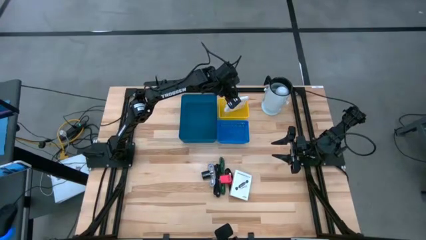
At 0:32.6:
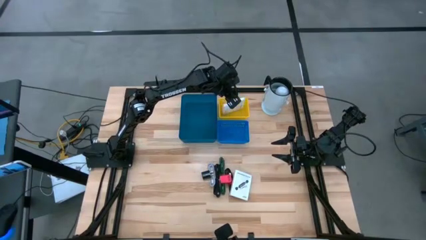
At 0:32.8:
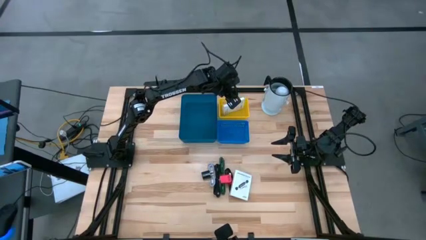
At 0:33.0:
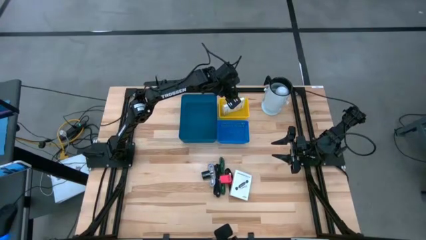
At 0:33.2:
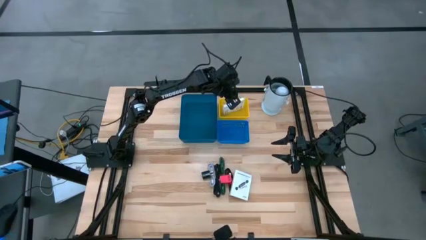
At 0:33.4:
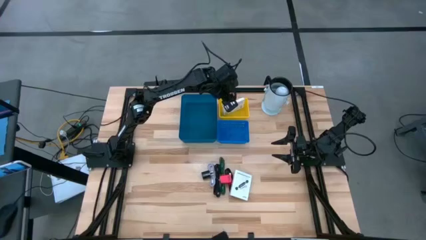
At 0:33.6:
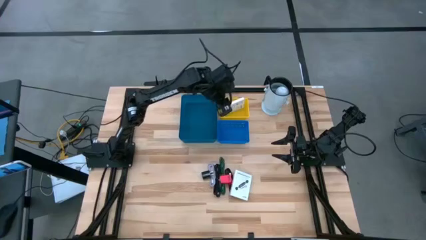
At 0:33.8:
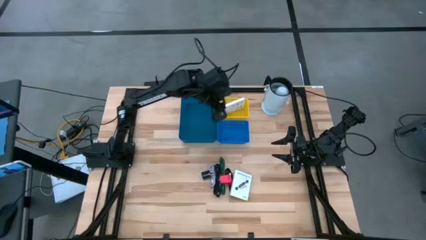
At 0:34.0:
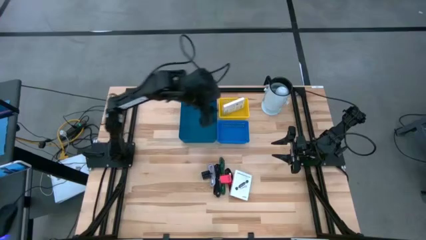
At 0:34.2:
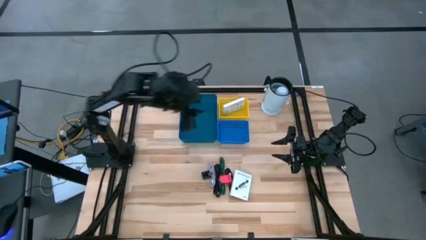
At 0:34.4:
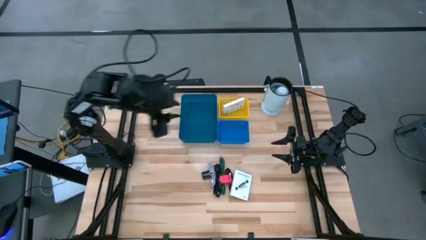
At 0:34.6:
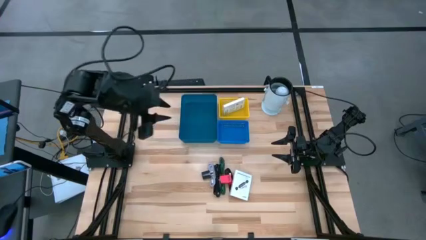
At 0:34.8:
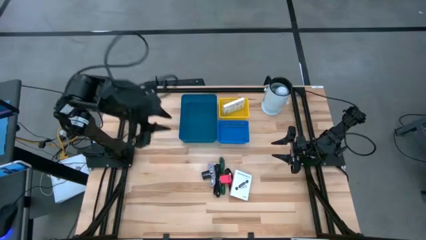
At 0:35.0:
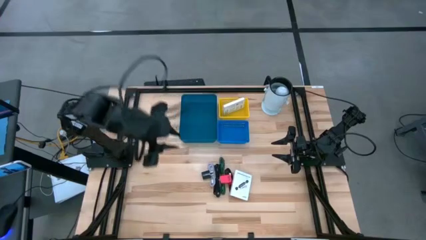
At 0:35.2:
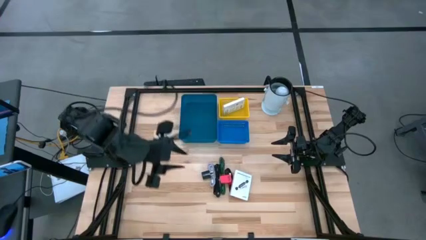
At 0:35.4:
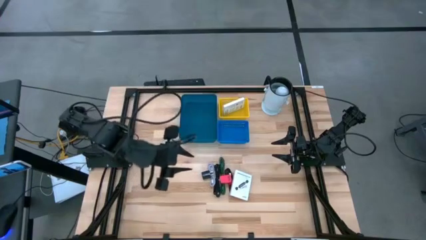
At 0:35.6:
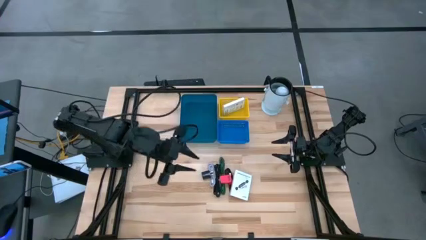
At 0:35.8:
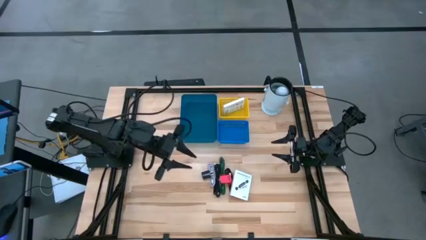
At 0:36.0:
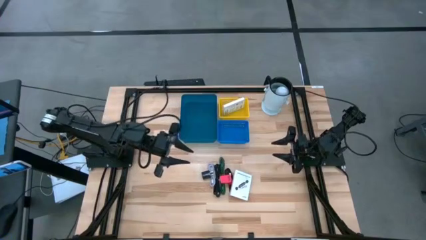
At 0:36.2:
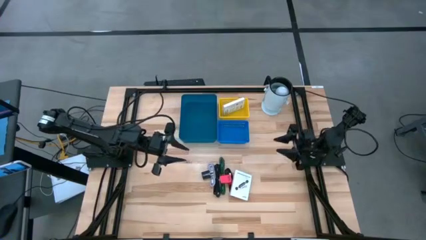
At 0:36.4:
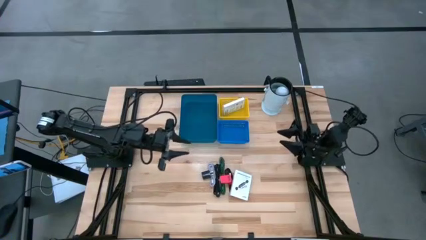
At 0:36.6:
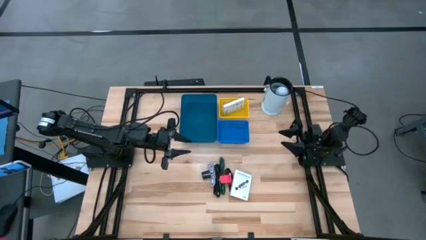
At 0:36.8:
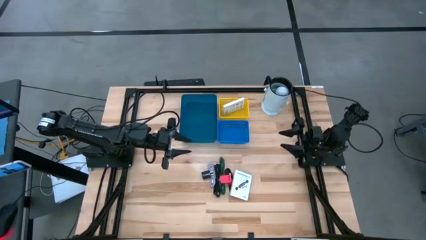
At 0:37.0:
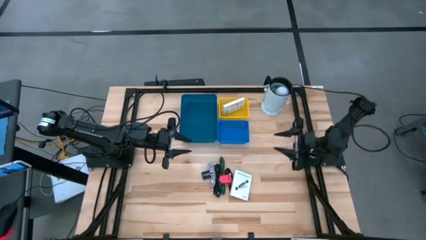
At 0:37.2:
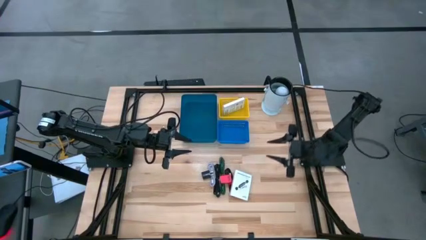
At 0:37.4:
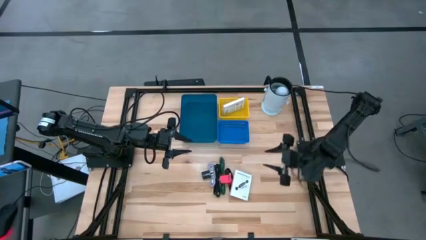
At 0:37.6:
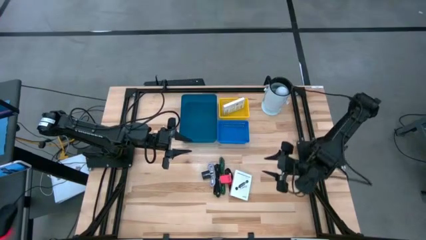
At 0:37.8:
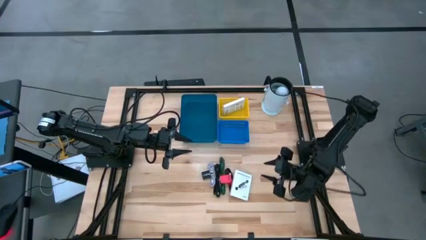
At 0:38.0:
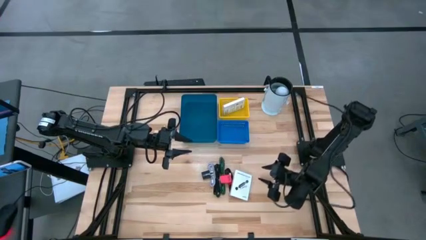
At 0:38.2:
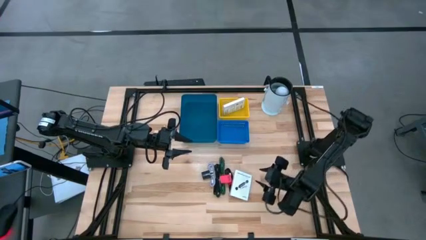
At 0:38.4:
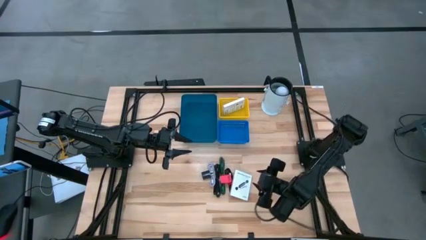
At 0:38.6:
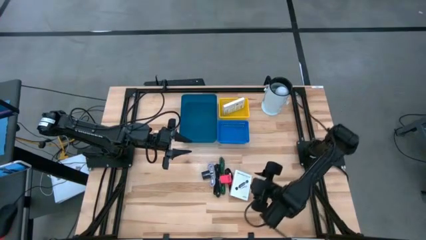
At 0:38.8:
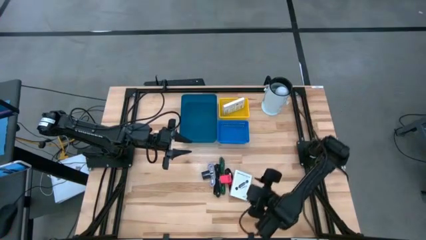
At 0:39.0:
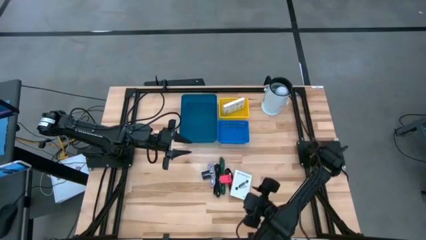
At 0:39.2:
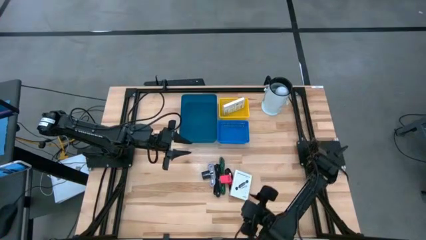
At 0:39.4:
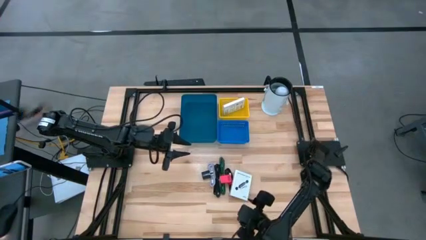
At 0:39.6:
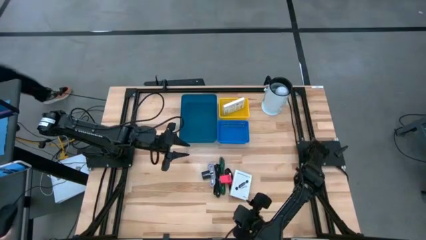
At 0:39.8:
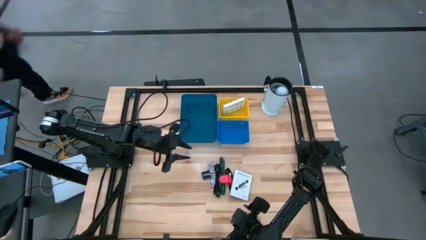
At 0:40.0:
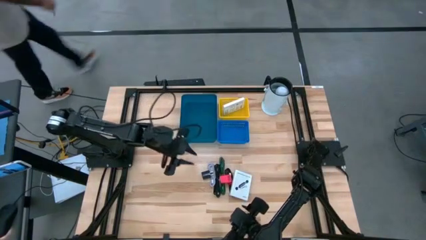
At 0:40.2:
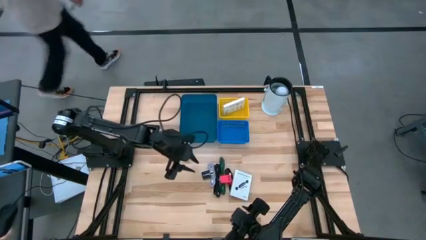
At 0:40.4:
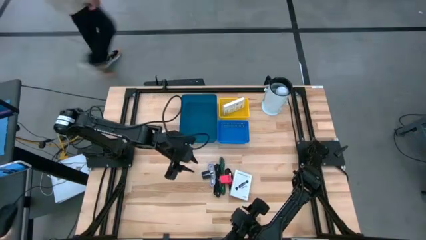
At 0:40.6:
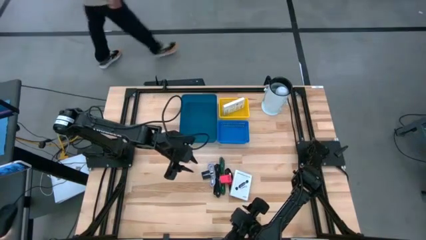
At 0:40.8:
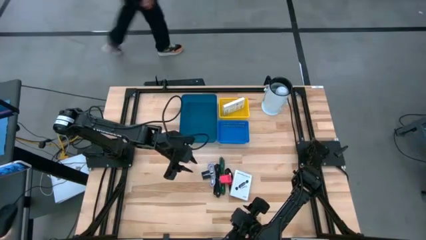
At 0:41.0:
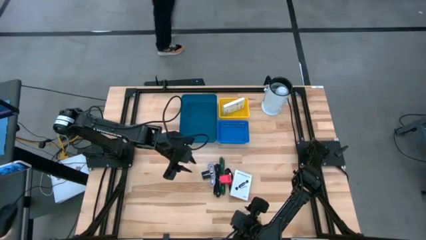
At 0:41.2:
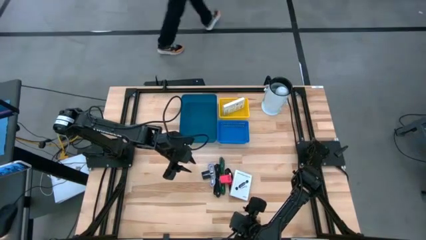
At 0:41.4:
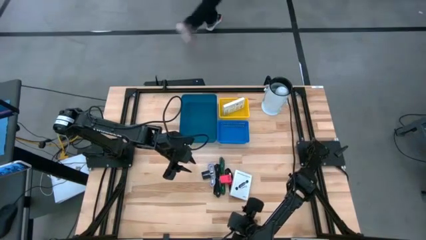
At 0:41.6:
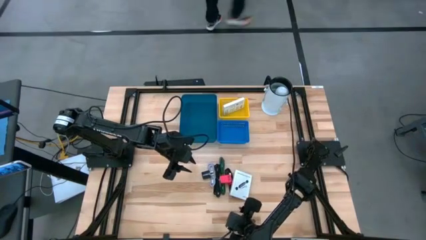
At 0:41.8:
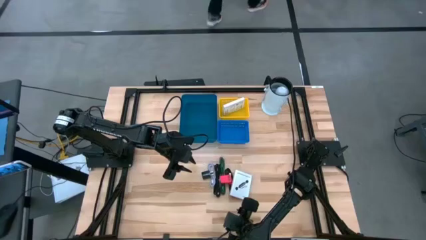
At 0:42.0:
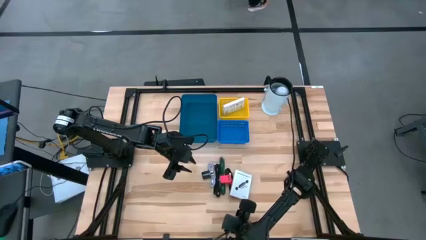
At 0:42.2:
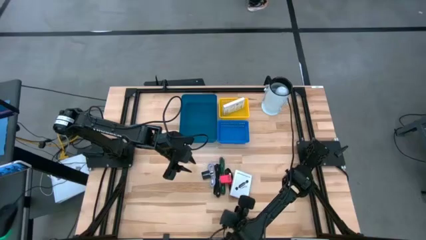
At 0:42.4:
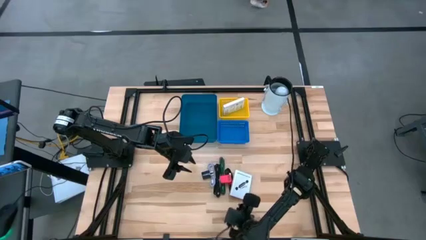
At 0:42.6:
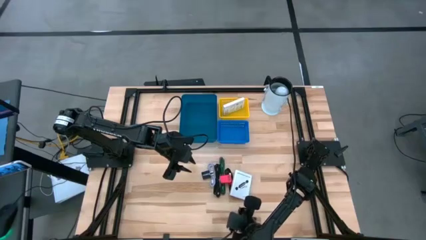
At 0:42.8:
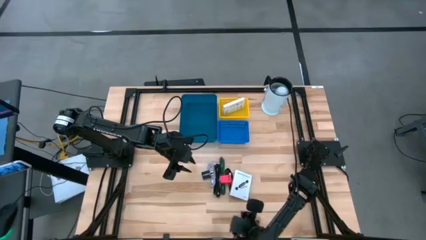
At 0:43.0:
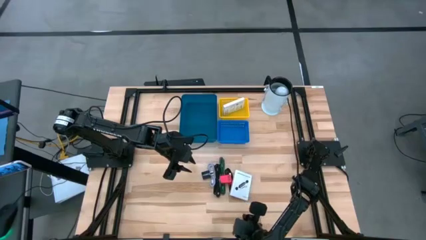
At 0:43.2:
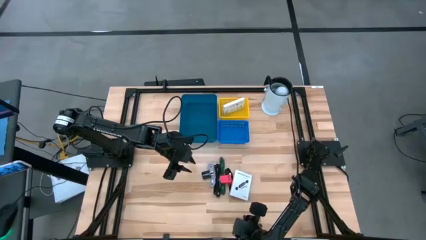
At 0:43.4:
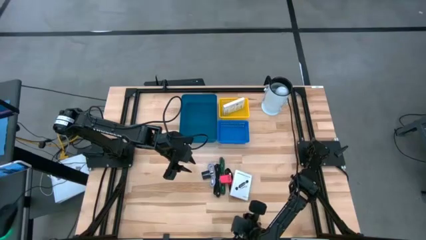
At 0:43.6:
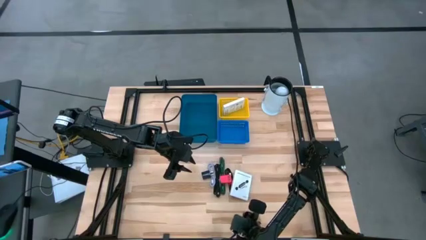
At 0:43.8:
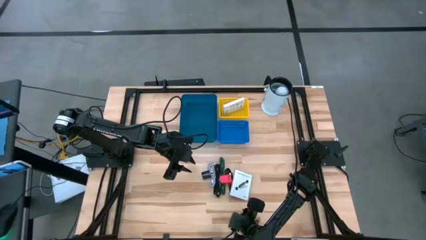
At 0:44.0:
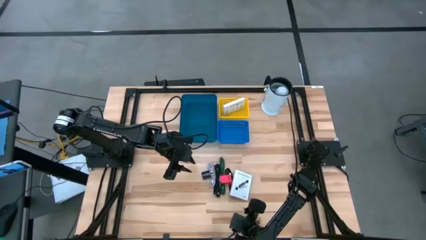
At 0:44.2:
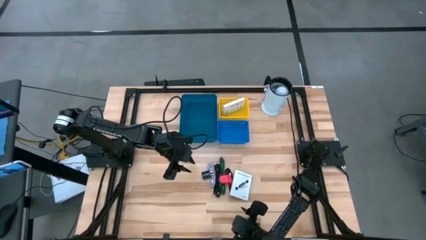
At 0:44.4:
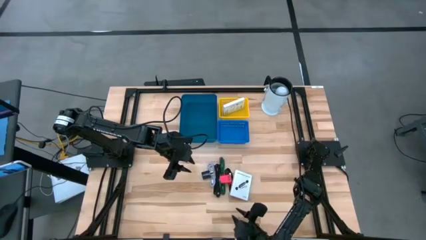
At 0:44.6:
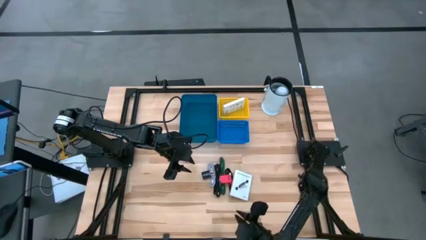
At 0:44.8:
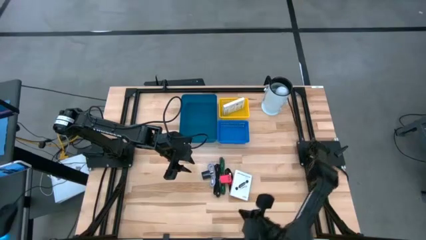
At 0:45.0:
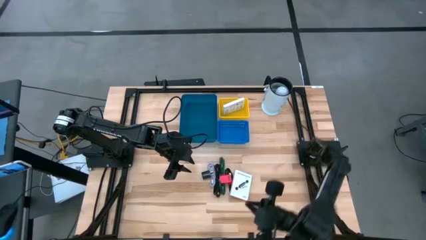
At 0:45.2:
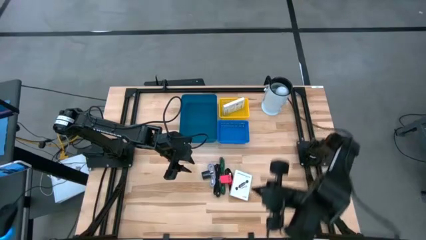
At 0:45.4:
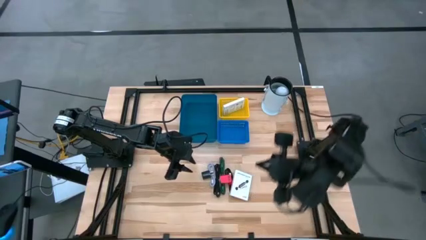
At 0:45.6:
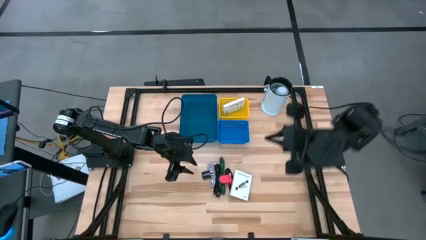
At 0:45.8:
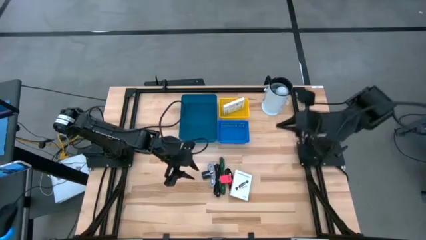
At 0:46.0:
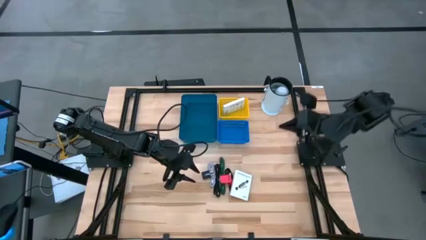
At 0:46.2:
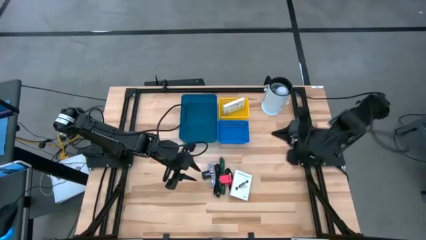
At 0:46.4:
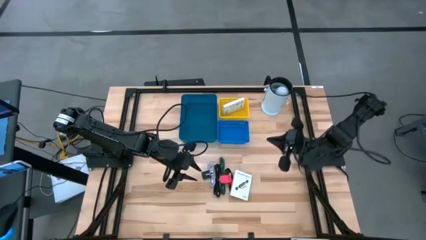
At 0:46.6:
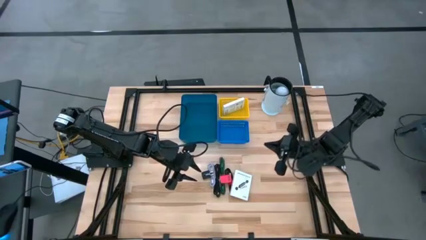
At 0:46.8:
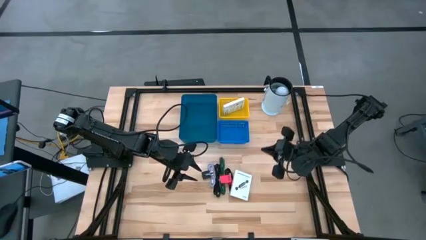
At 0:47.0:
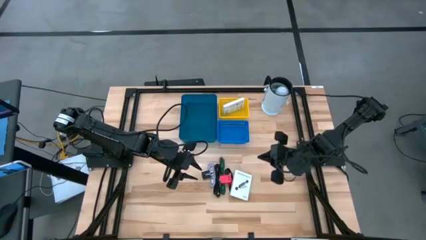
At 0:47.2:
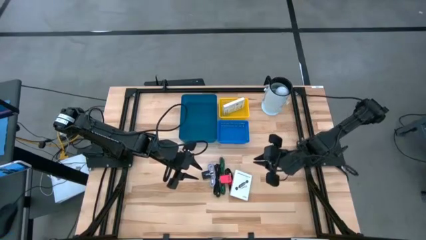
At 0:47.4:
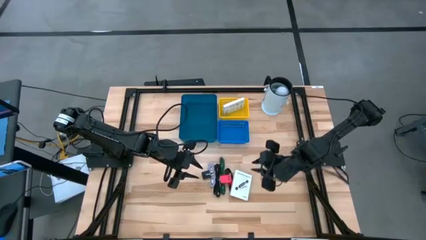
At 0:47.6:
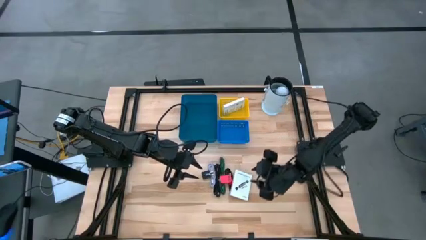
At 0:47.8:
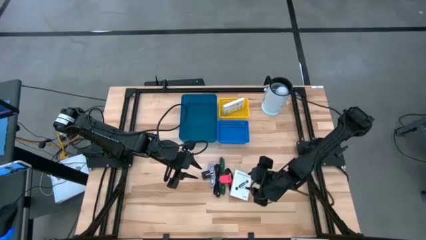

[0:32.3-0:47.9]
Task: Pick and place items into bin
Put the card reader box into the yellow bin
